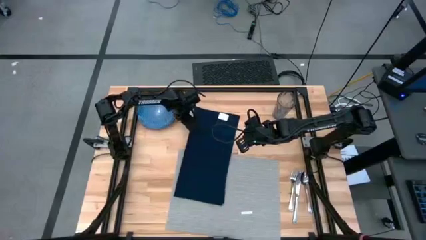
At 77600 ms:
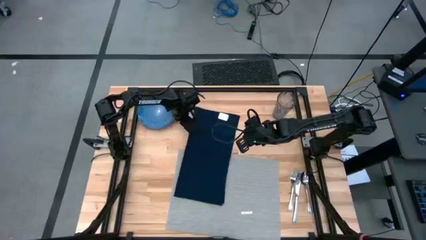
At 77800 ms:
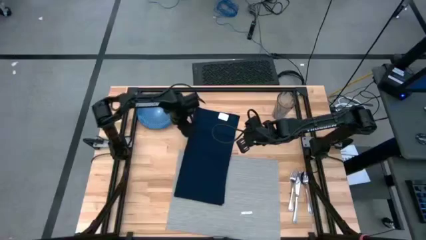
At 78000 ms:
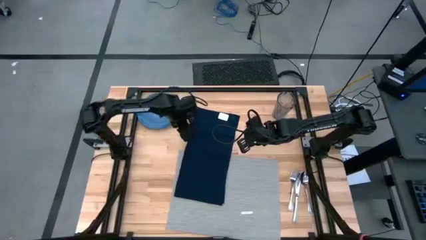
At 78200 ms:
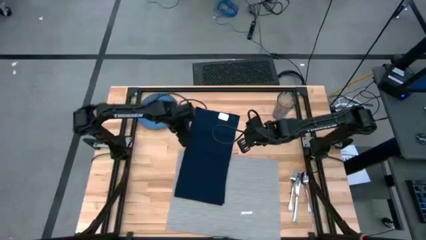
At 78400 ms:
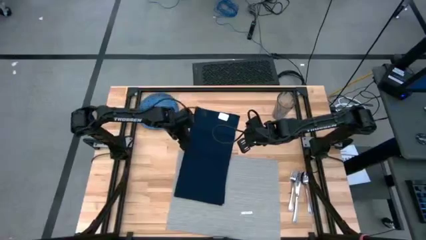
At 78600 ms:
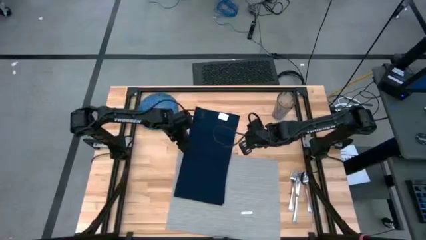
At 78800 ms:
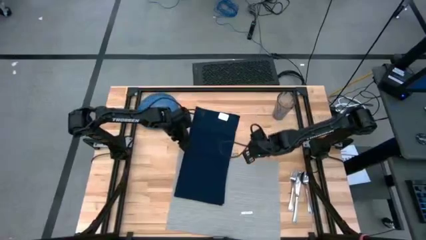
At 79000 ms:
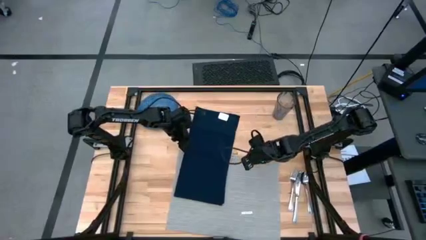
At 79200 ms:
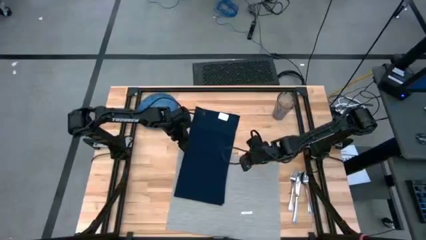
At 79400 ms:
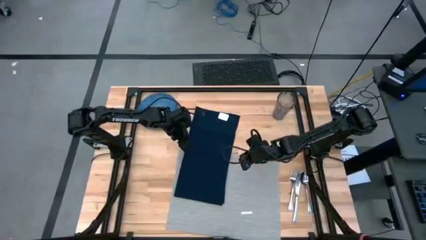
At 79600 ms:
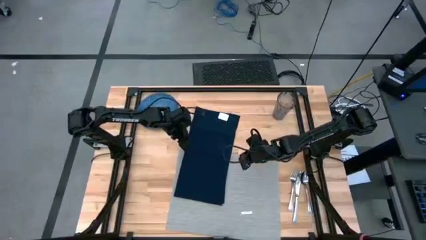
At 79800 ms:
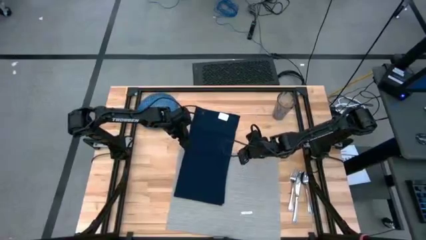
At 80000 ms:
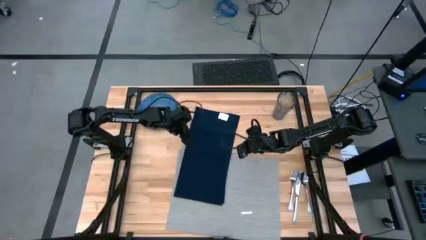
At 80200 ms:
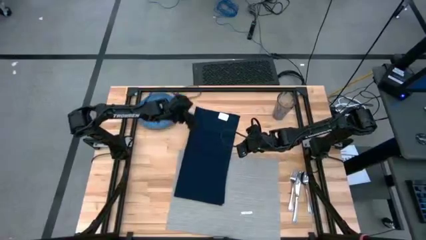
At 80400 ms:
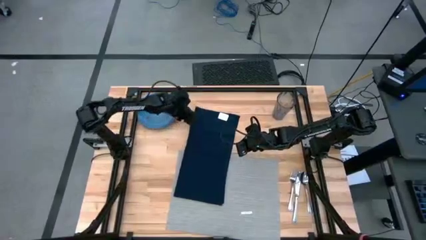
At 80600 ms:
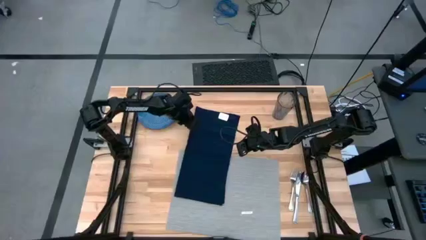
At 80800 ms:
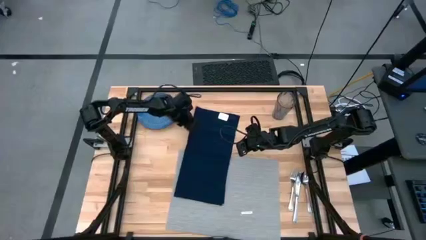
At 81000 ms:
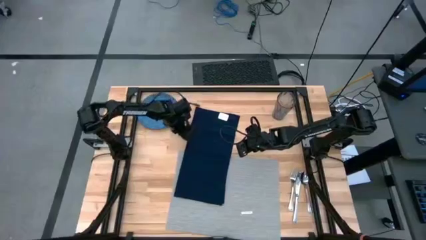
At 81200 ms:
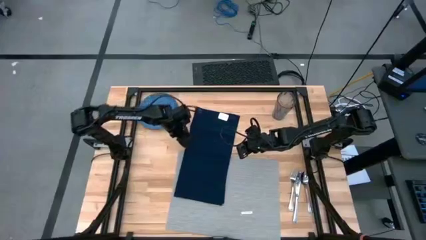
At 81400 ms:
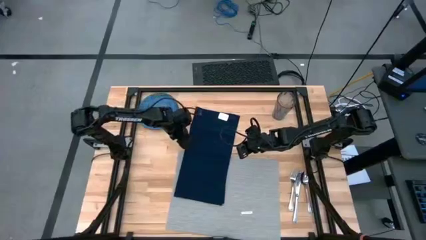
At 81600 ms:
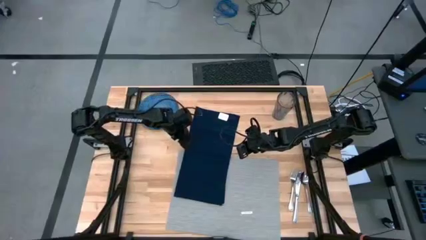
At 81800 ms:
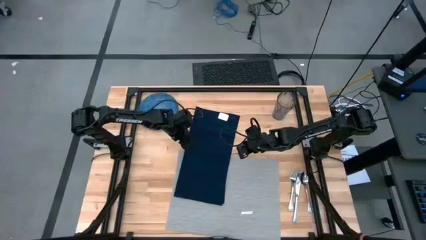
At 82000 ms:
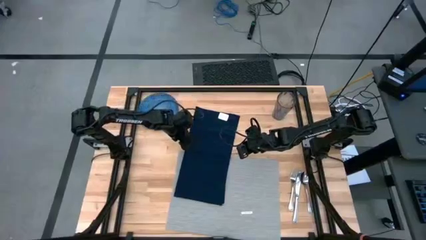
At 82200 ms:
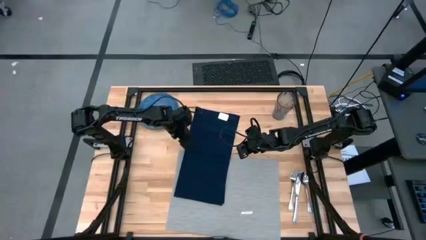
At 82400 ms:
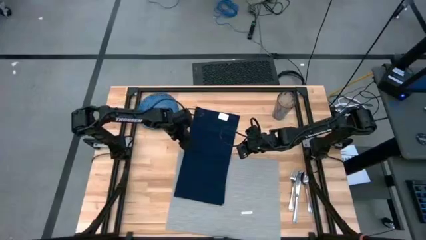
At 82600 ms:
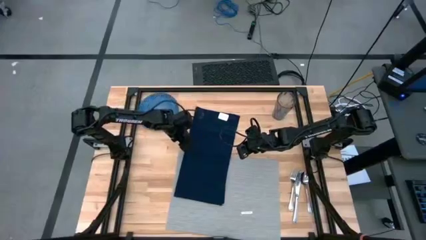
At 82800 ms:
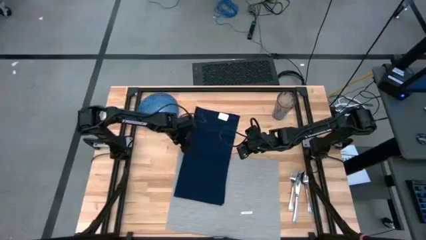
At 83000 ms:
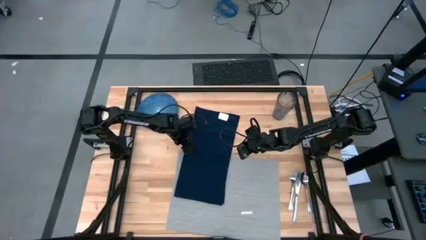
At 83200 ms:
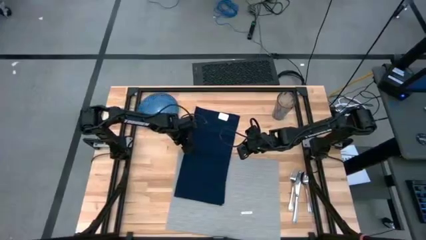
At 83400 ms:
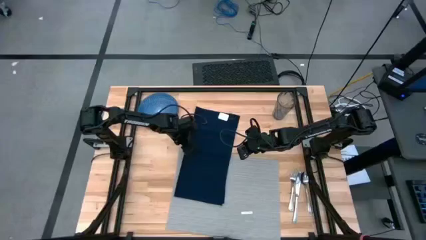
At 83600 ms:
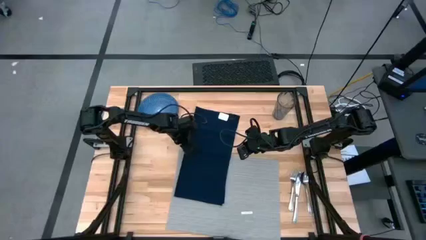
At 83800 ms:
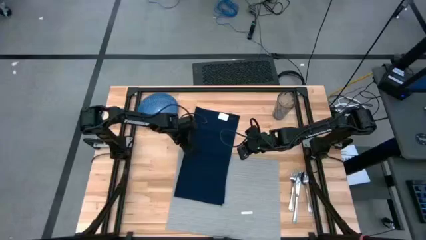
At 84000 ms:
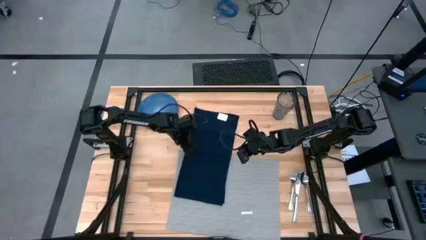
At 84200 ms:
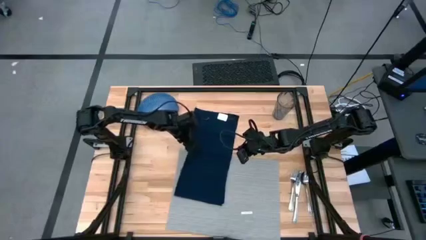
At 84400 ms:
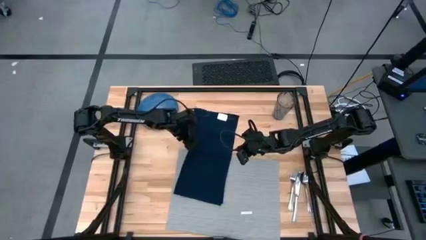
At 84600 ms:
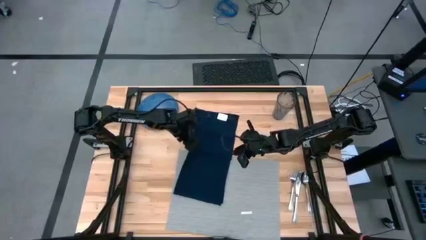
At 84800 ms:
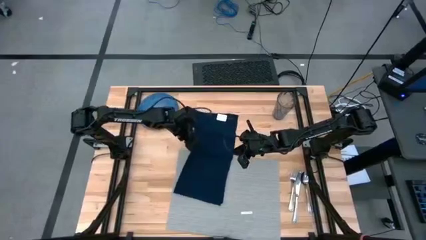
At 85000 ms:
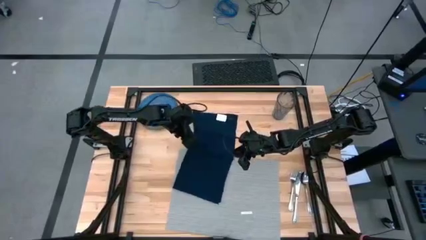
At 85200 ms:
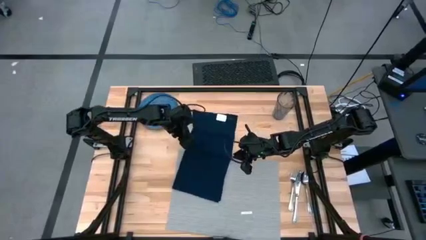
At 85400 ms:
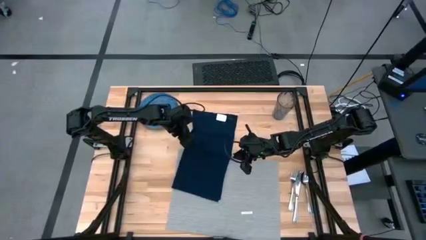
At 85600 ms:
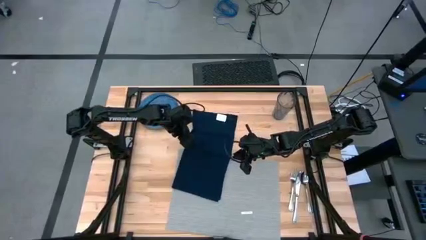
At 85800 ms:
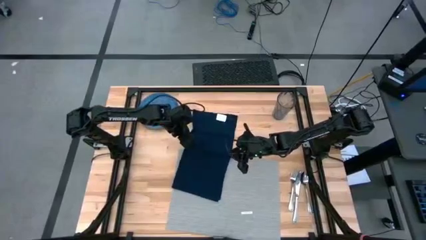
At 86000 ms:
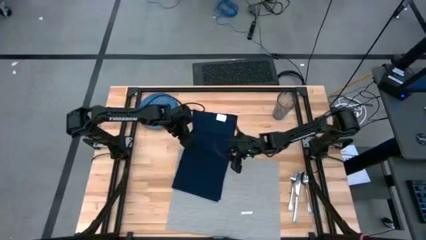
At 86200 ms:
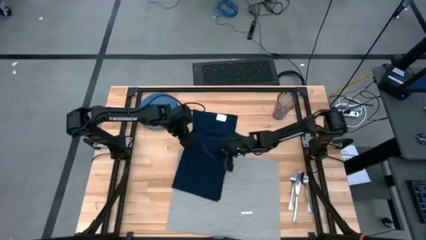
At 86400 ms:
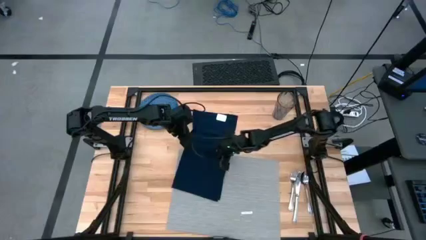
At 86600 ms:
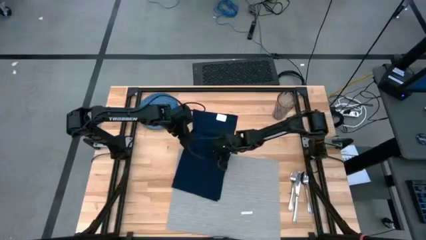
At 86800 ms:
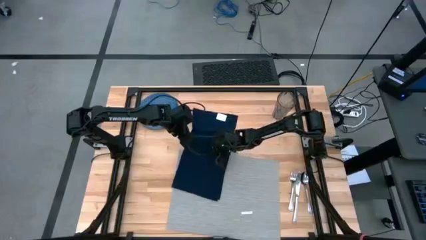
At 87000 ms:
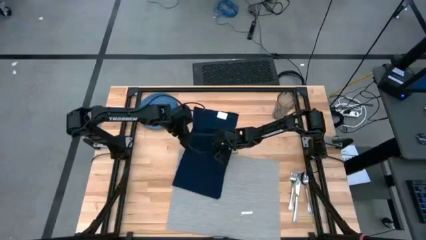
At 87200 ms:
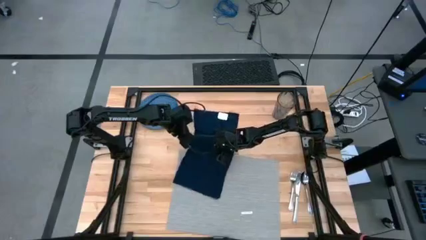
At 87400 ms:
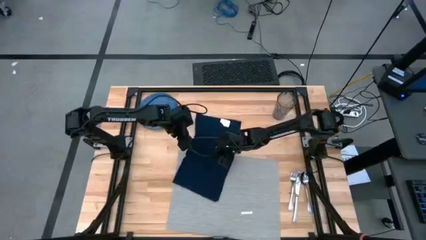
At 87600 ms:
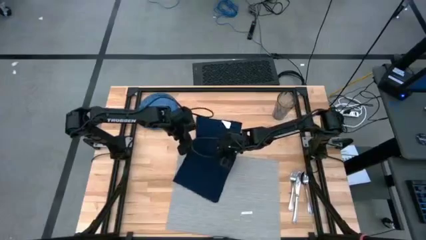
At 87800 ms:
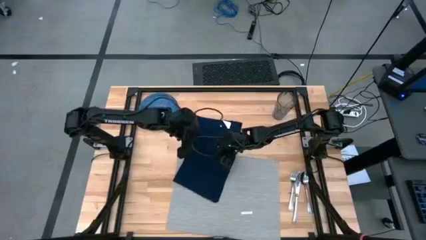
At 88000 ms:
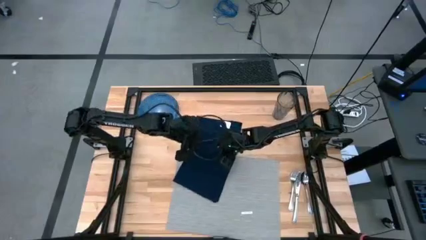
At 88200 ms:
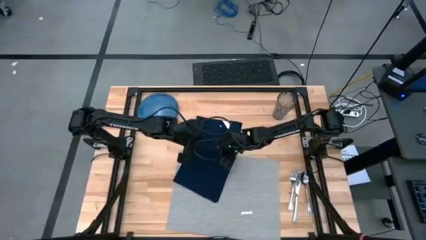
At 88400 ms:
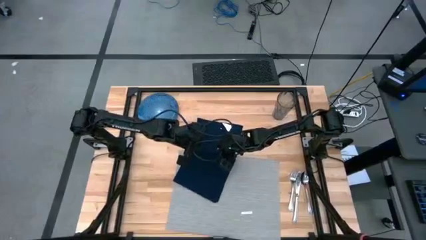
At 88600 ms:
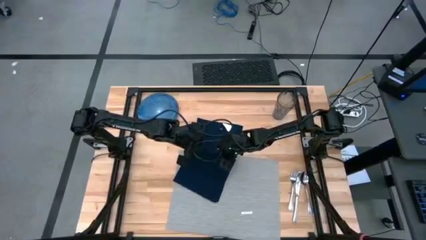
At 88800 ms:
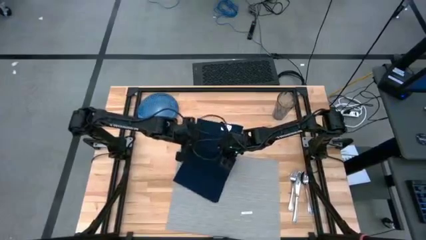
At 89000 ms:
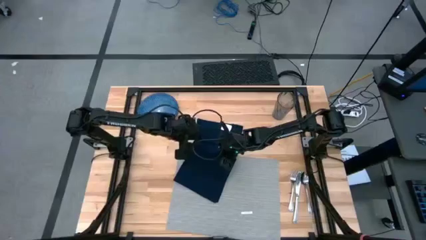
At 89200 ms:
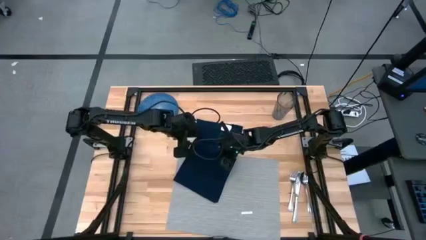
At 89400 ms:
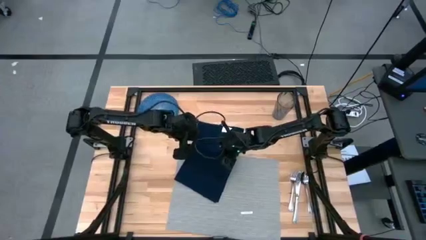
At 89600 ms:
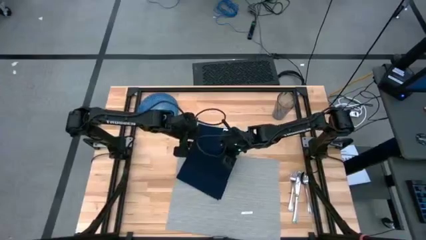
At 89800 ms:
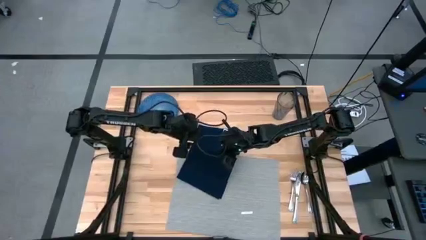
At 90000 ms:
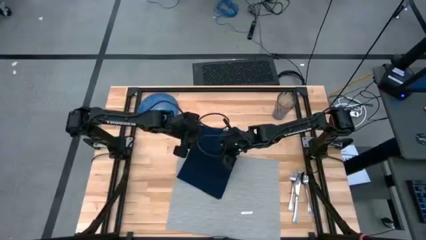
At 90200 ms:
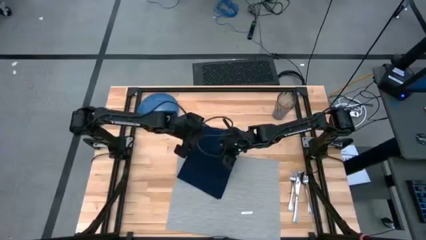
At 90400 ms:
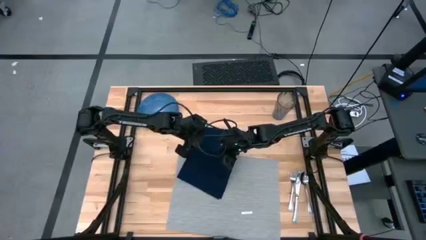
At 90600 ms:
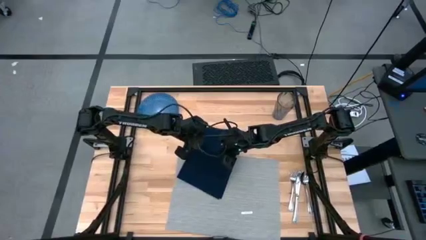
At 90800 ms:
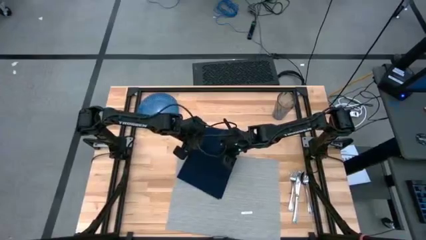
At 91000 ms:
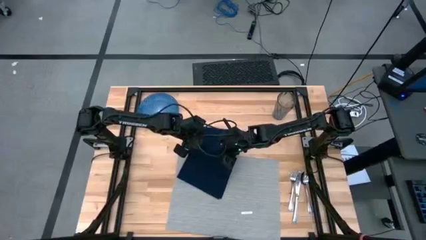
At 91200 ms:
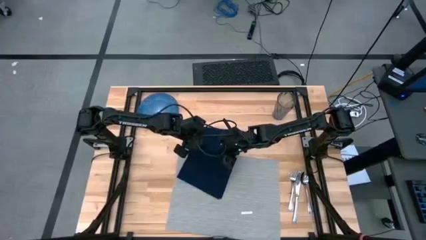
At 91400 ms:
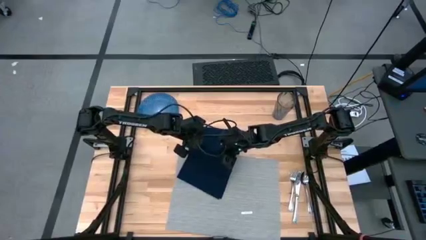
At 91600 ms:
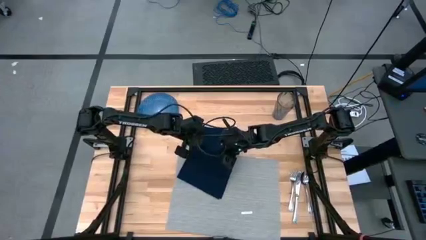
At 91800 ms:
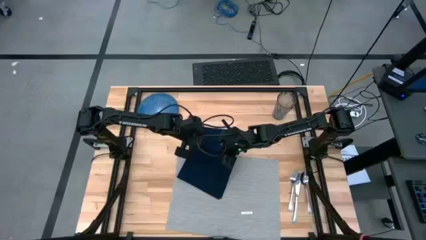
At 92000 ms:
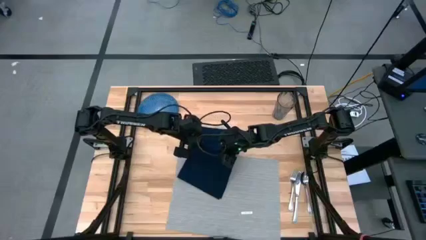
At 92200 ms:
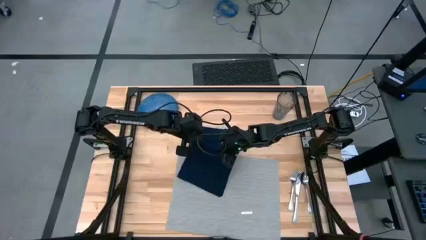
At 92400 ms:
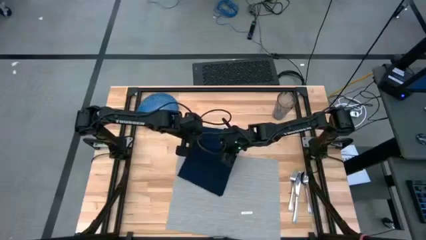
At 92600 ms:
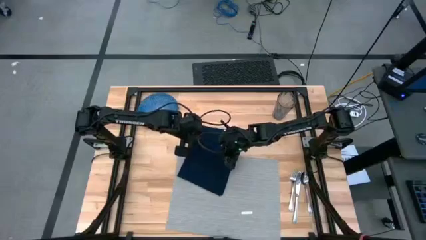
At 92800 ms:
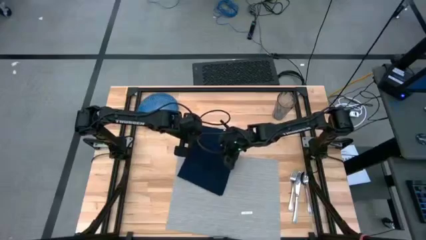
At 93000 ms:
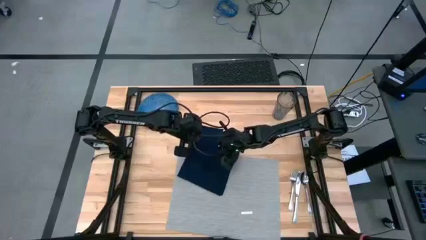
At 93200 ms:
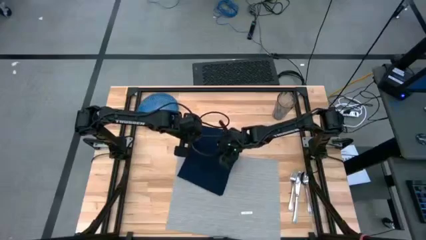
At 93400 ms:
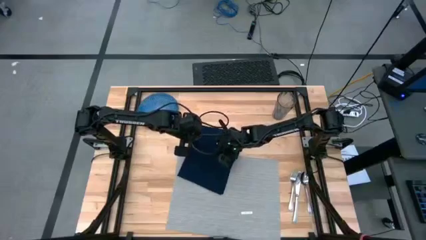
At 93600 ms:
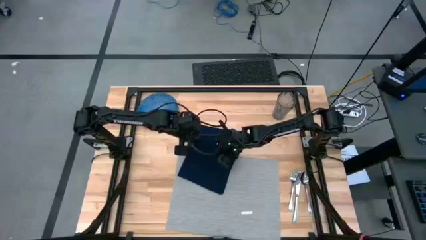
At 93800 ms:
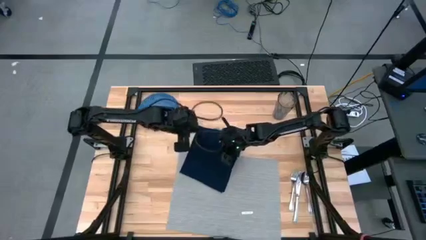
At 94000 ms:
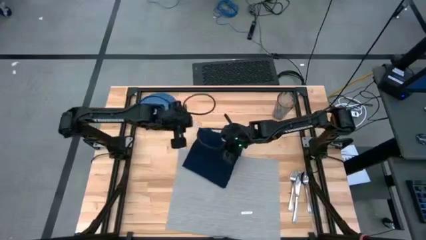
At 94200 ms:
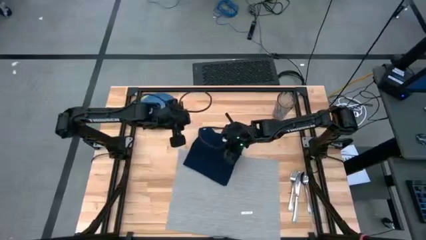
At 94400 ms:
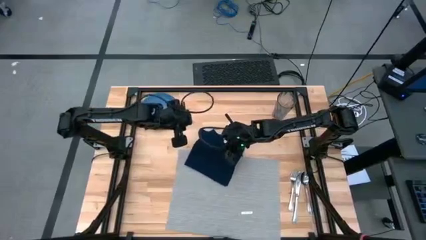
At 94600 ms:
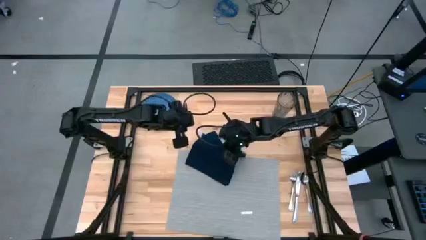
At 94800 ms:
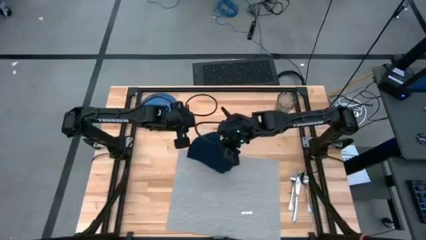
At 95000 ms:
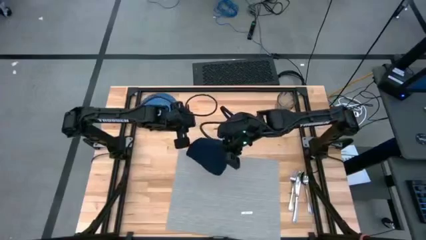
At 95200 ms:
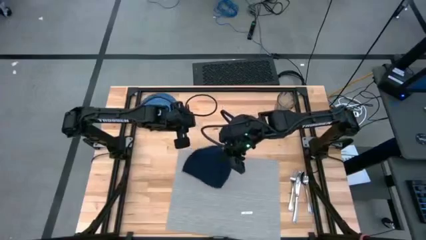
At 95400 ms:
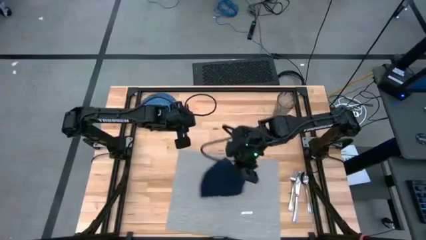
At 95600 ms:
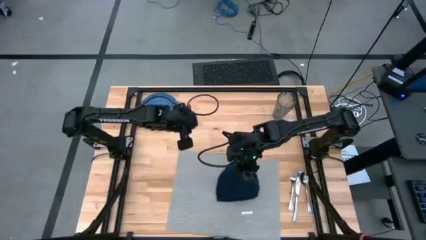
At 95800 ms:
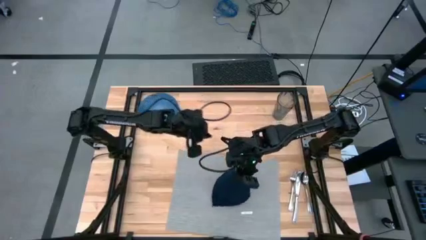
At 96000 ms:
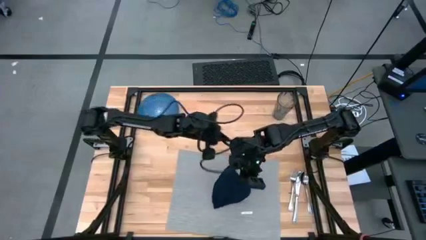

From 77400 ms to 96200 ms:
Task: Set table place
Fold the dark blue napkin
